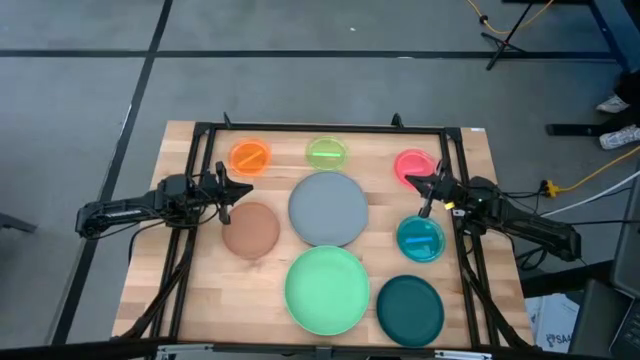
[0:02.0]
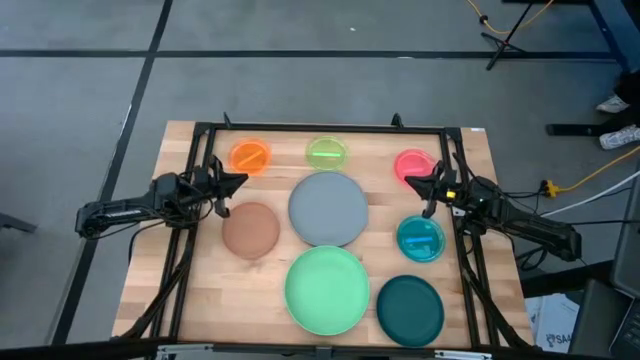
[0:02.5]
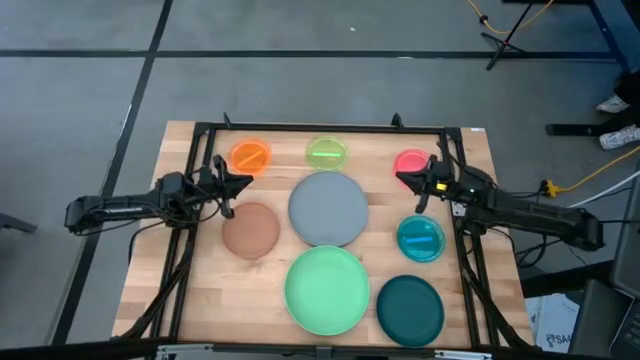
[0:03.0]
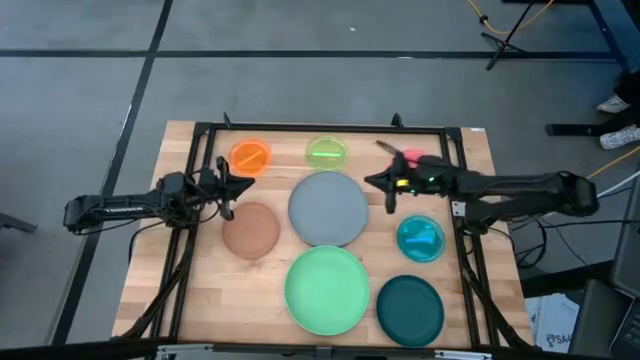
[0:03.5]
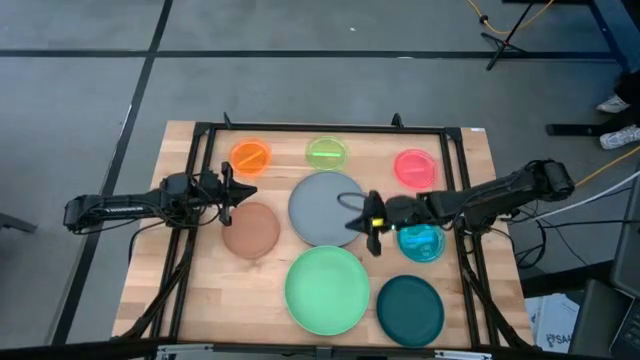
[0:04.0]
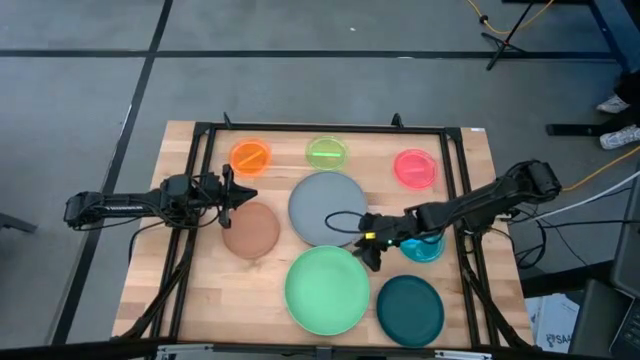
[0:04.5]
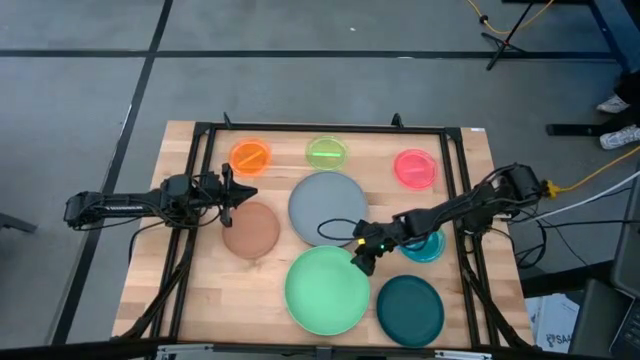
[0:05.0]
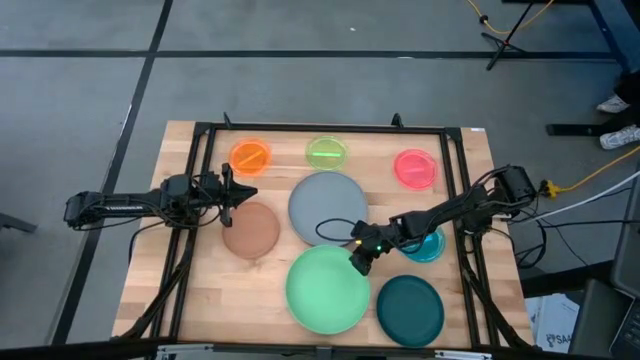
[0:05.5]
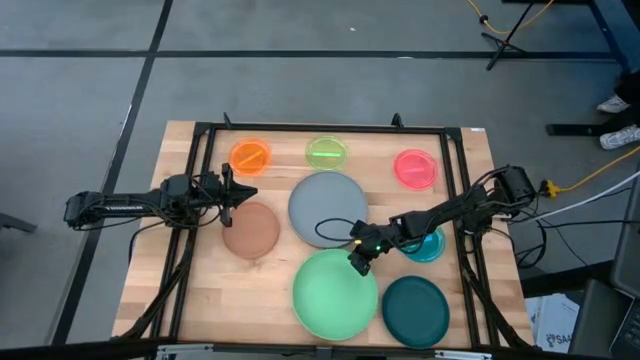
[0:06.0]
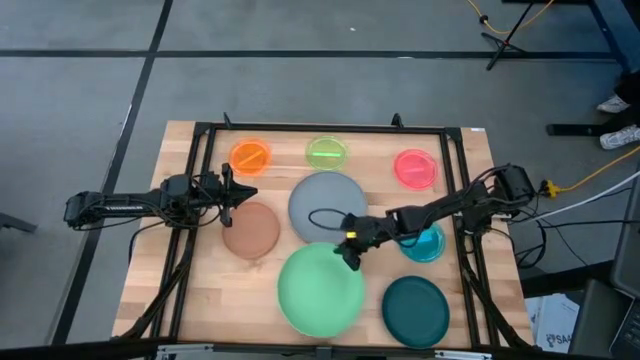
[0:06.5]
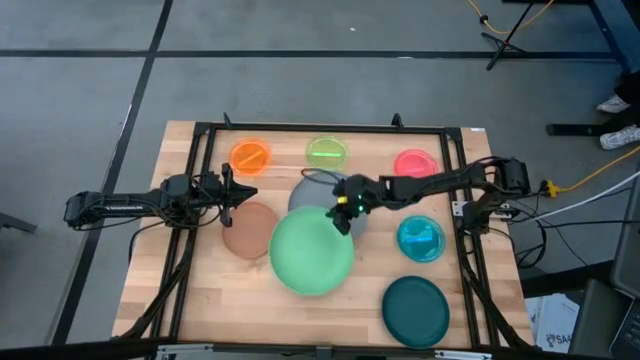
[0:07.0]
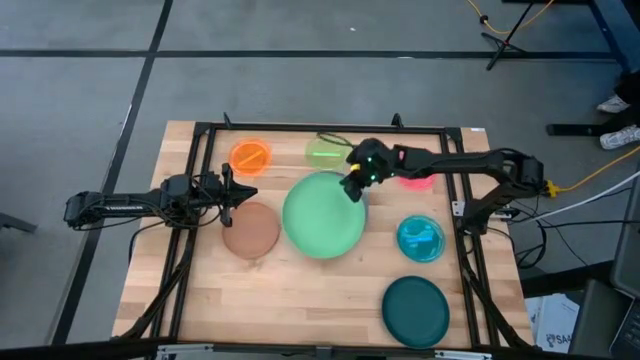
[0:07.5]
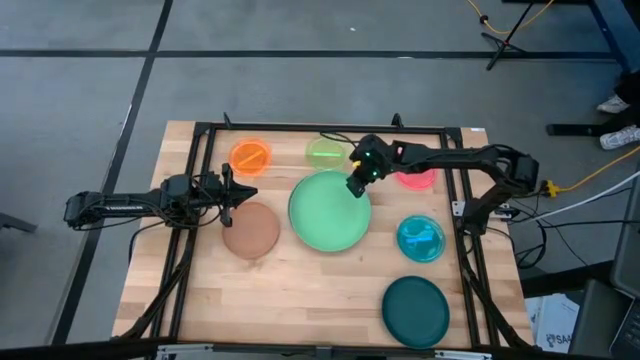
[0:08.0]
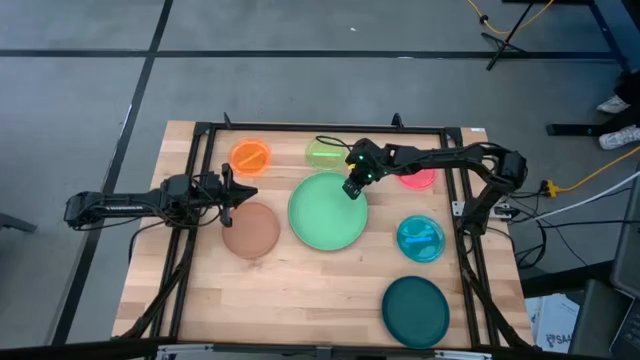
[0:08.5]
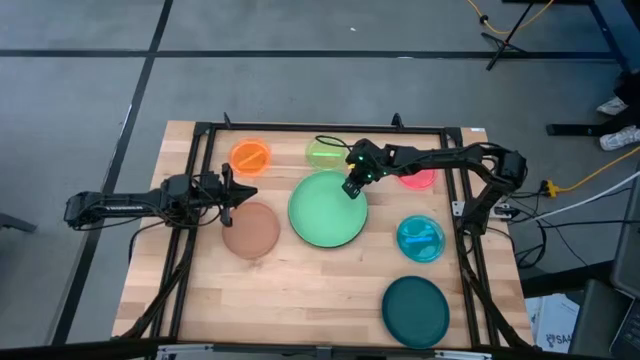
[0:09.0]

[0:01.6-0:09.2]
Task: Stack plastic plates
Stack the green plate on top of the gray plate

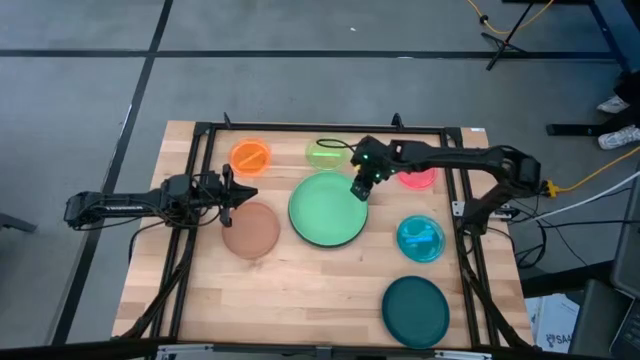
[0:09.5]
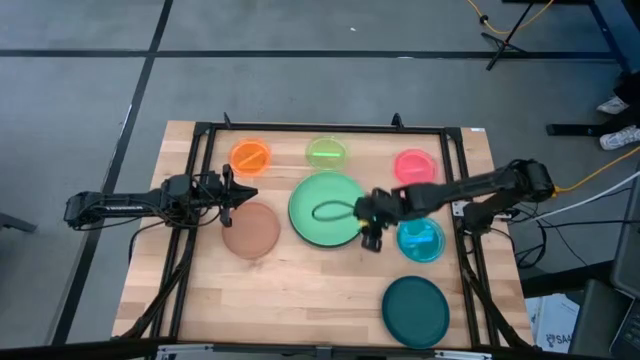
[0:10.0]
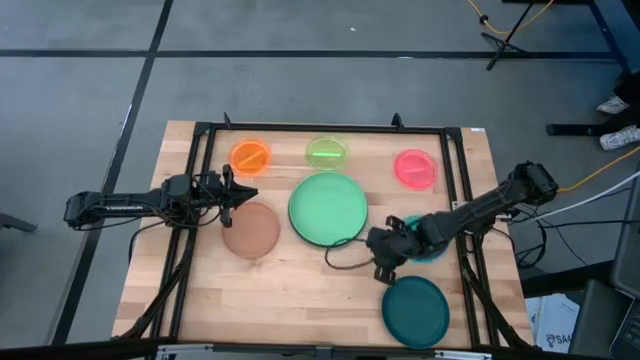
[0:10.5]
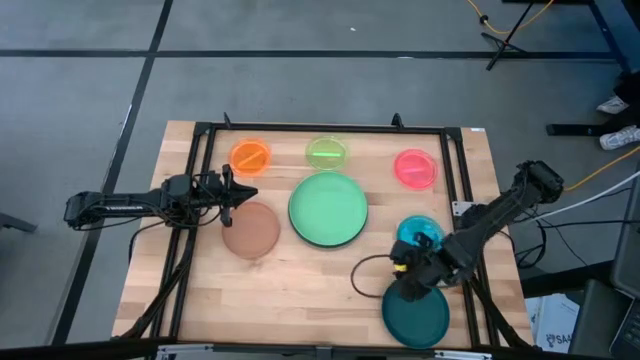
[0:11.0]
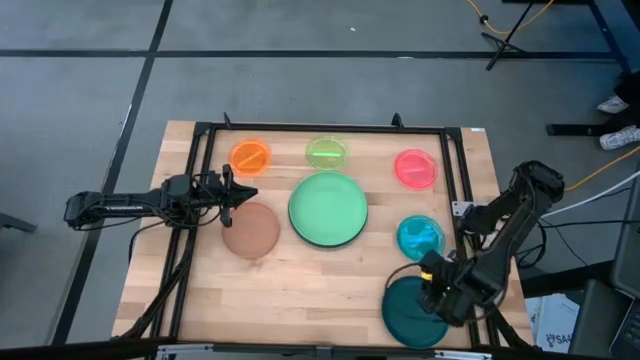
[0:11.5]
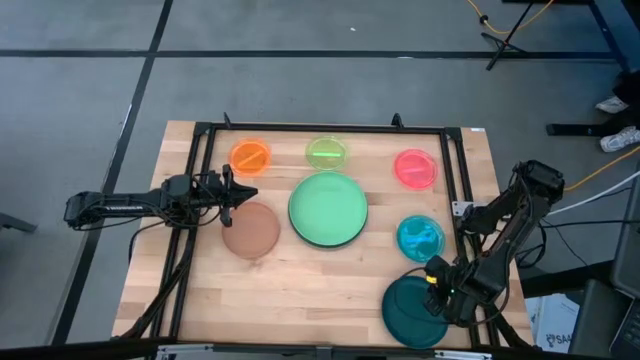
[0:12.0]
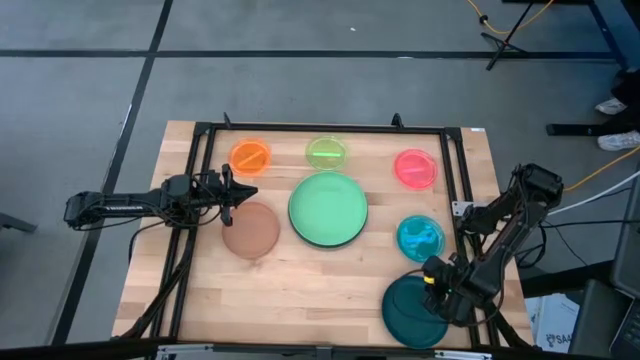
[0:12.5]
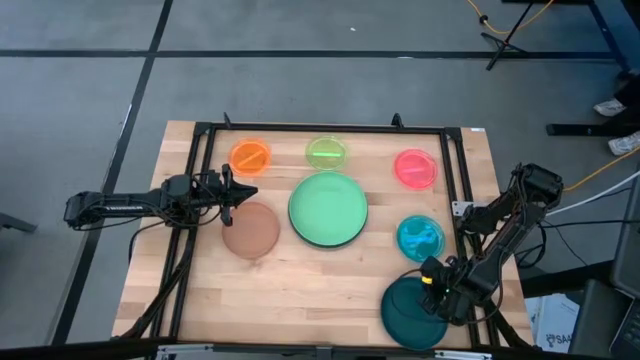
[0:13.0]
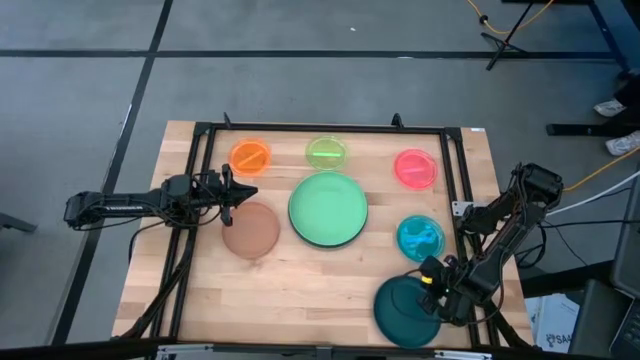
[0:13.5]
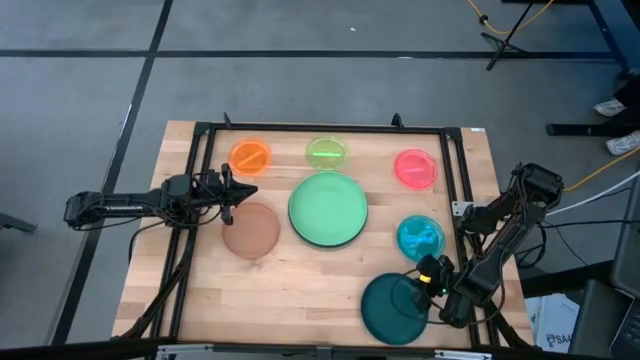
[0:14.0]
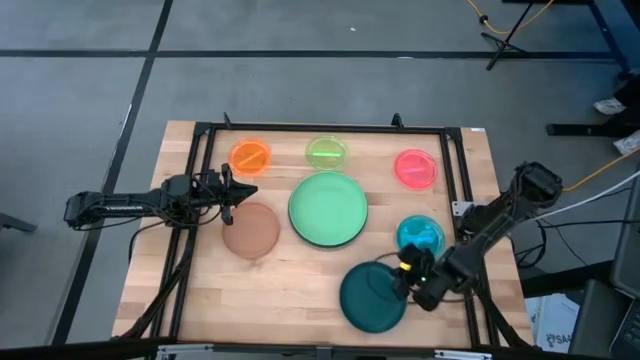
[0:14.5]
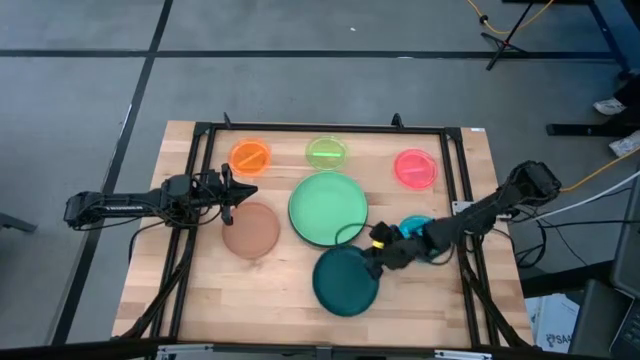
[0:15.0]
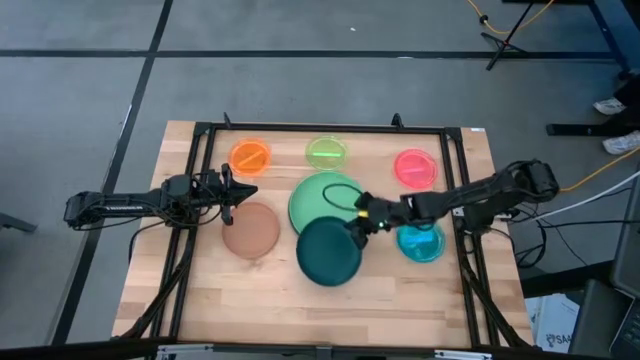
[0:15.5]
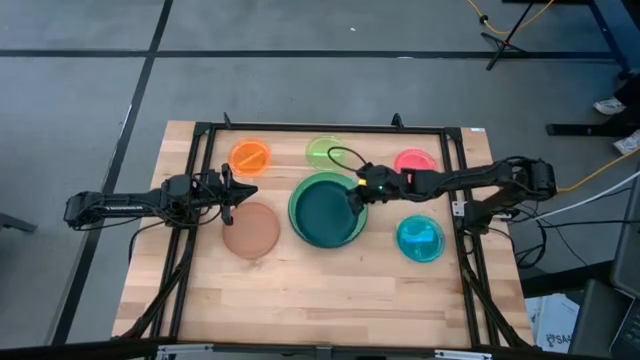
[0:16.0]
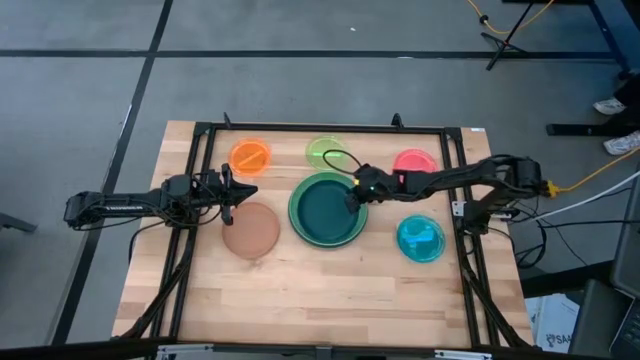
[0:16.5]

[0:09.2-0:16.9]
Stack the dark blue plate on top of the green plate

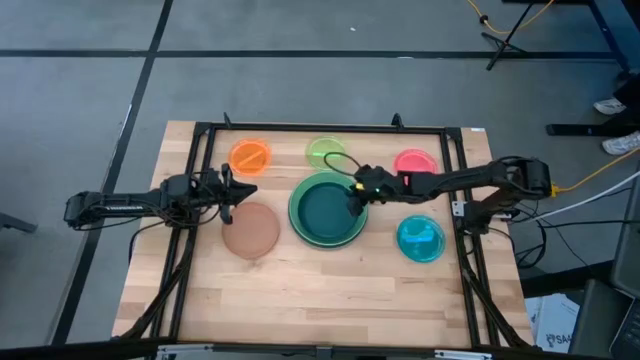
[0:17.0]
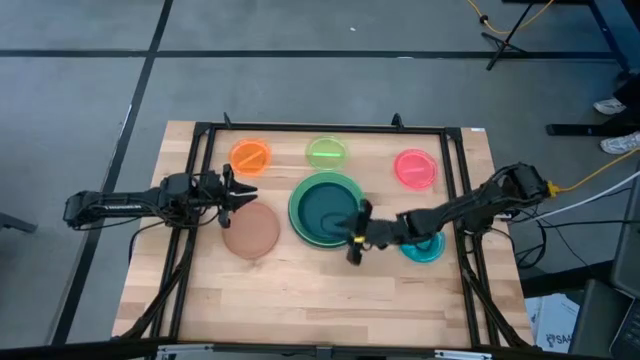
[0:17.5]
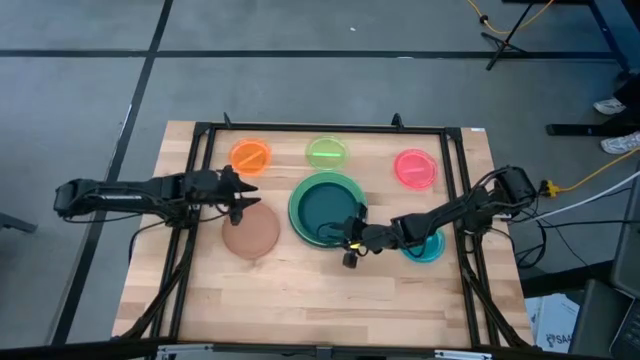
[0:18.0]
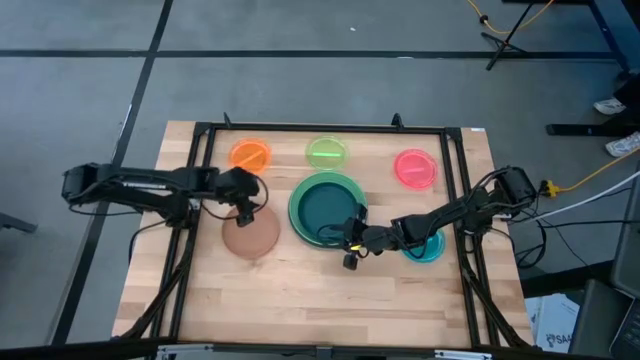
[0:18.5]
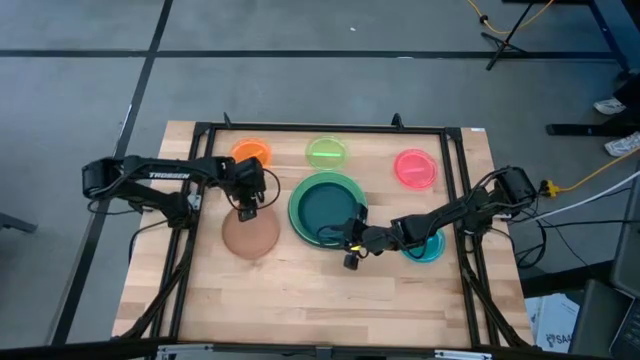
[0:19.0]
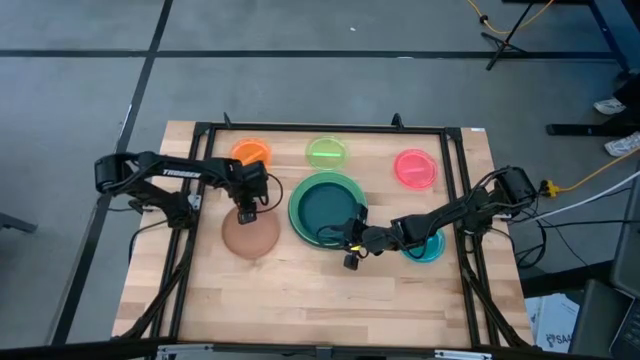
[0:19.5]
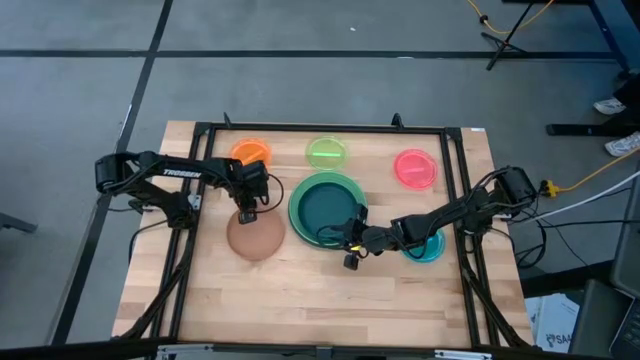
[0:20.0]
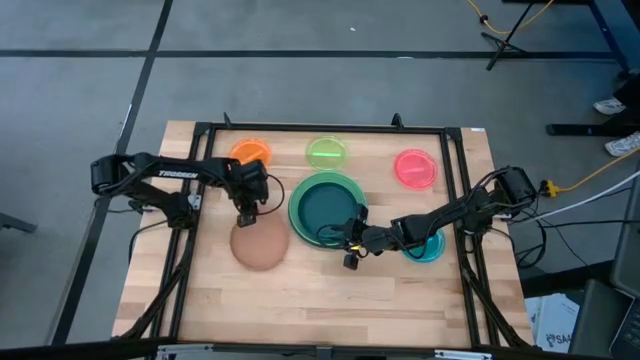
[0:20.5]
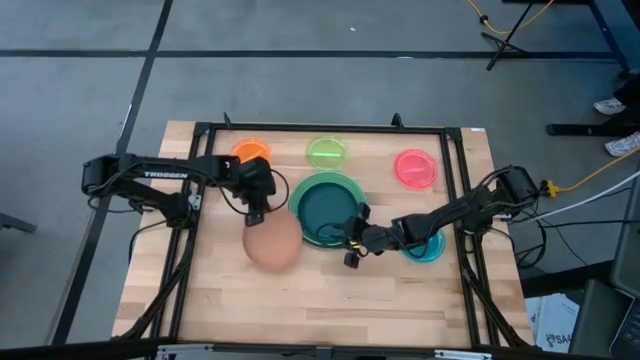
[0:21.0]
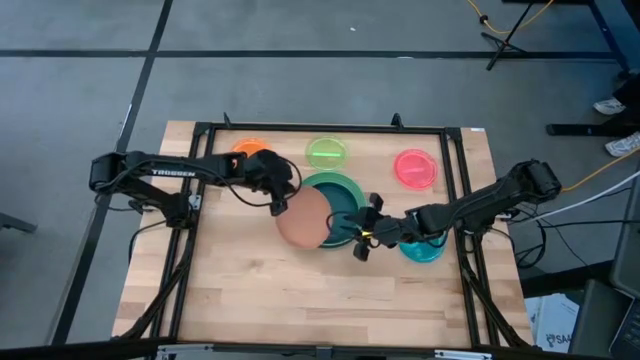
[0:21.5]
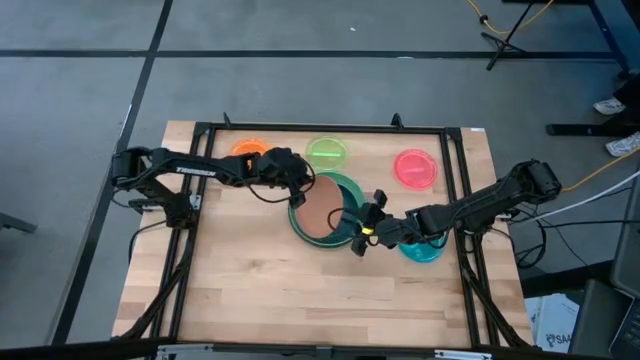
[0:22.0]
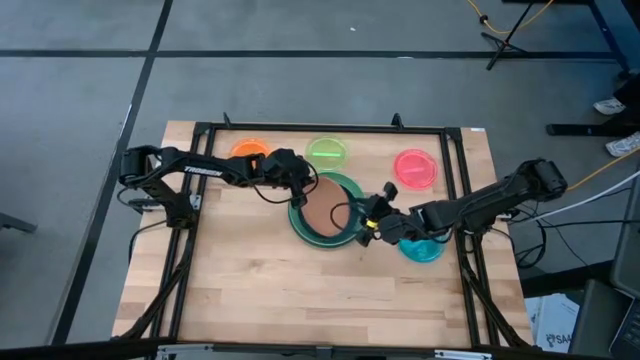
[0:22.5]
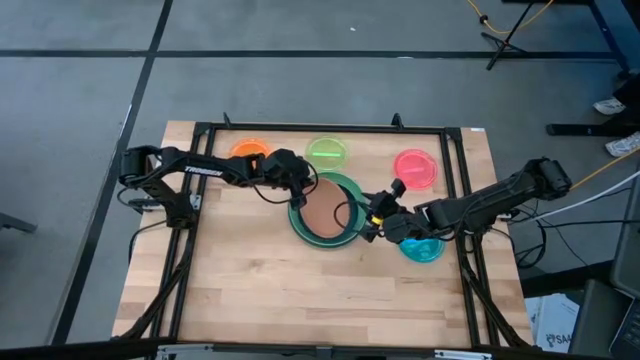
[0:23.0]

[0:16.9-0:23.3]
Stack the brown plate on top of the dark blue plate

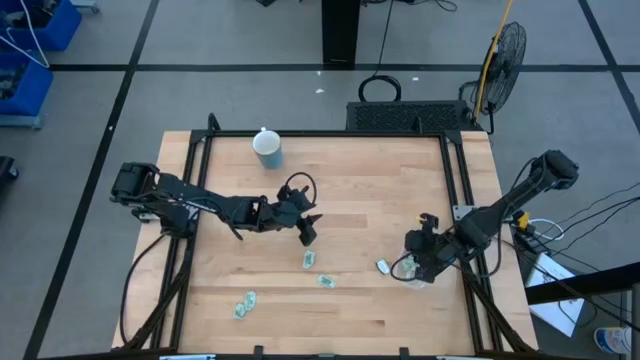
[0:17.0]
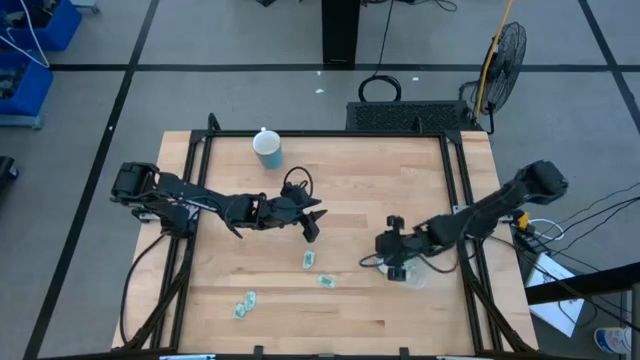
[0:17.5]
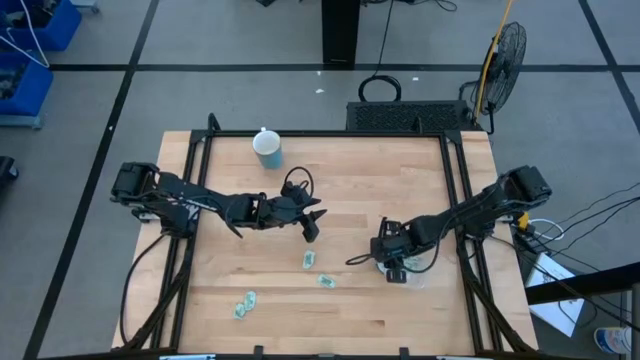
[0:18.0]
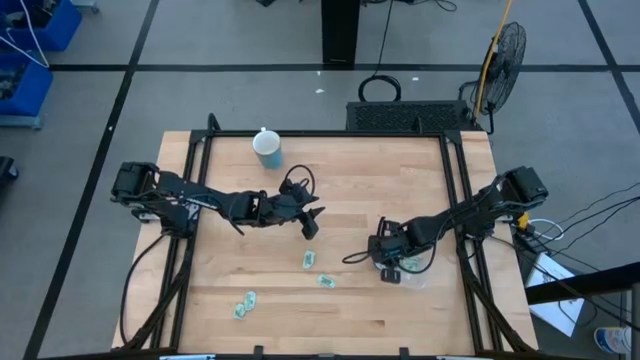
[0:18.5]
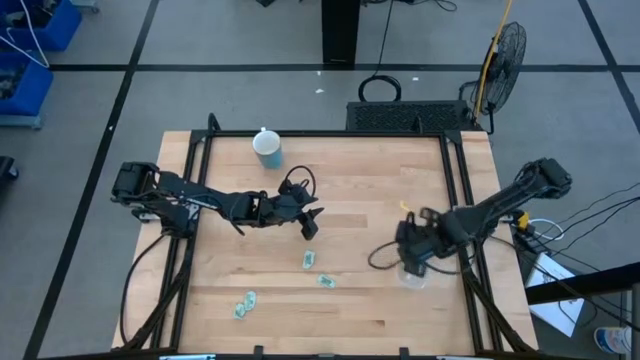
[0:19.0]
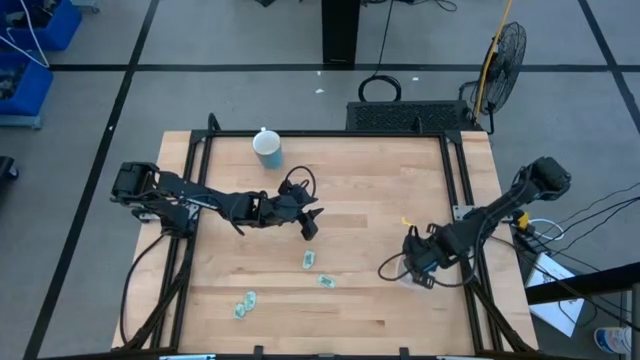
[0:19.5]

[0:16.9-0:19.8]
Task: Pick and place Stevia / Truvia into bins
Put the truvia packet into the transparent container
